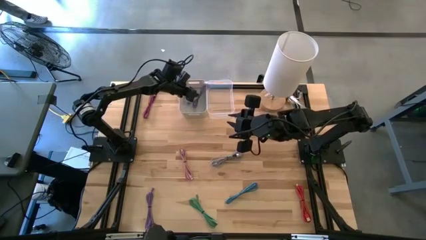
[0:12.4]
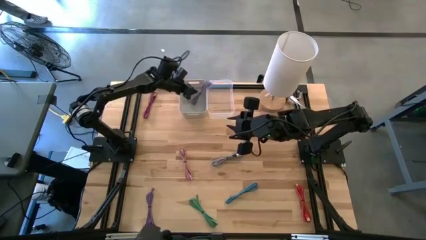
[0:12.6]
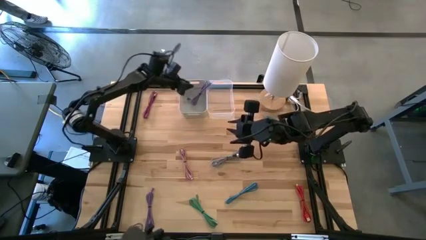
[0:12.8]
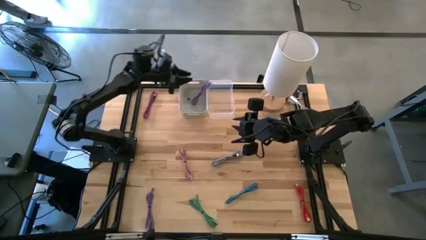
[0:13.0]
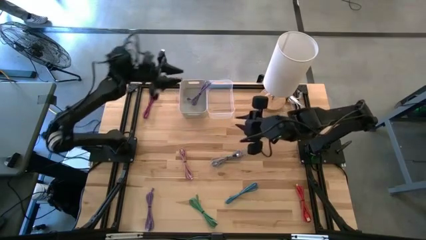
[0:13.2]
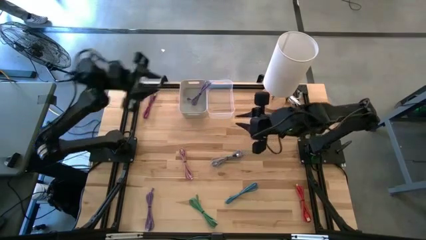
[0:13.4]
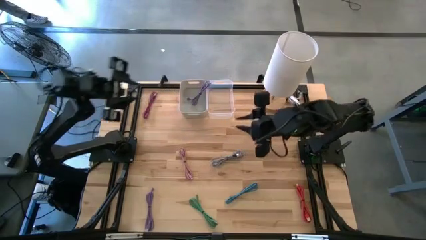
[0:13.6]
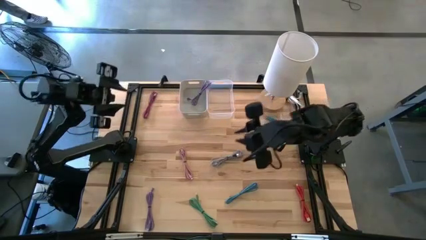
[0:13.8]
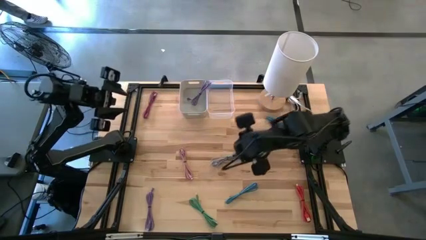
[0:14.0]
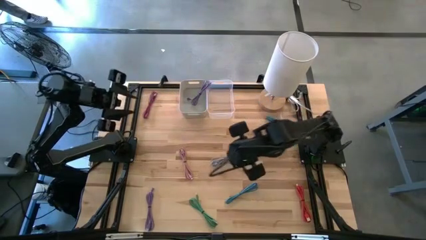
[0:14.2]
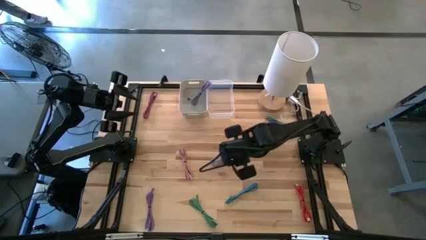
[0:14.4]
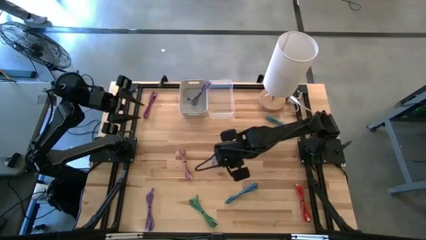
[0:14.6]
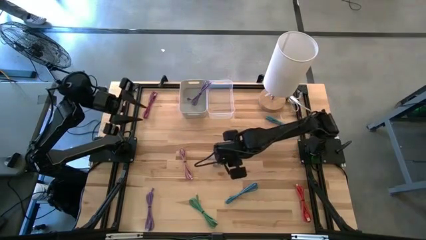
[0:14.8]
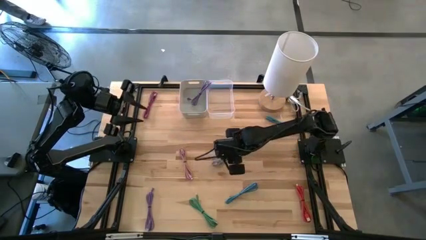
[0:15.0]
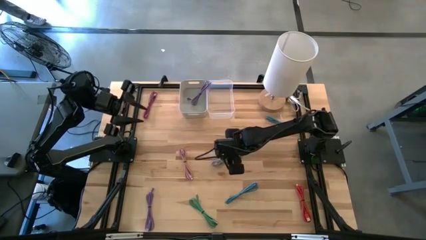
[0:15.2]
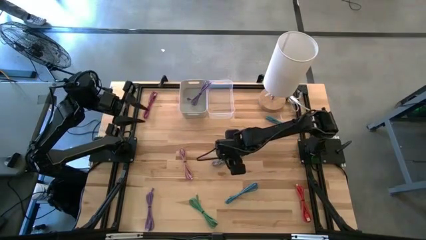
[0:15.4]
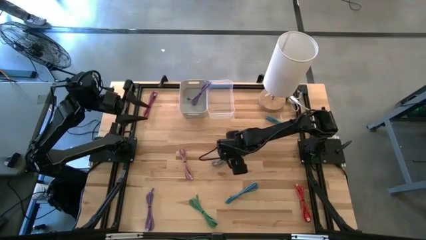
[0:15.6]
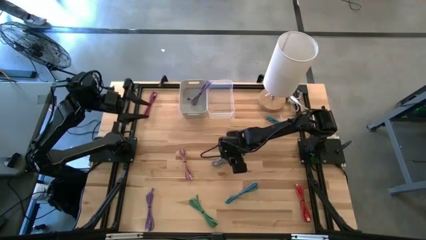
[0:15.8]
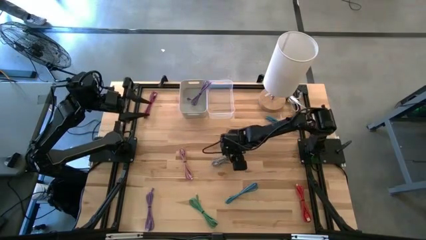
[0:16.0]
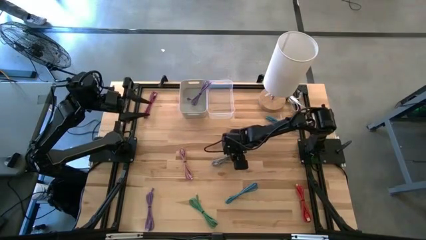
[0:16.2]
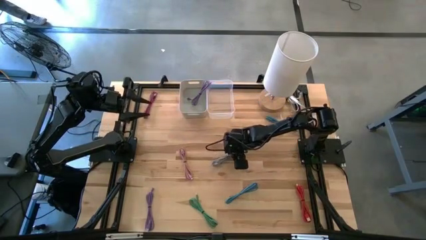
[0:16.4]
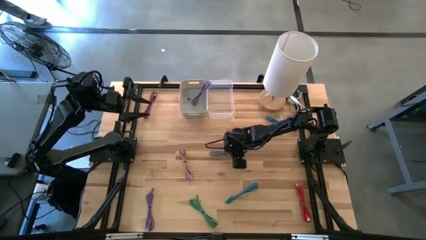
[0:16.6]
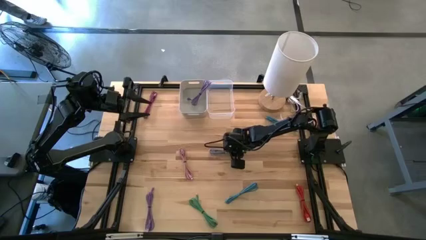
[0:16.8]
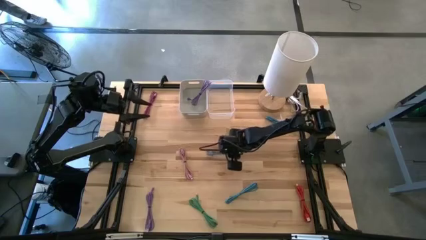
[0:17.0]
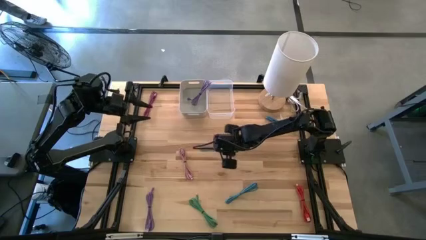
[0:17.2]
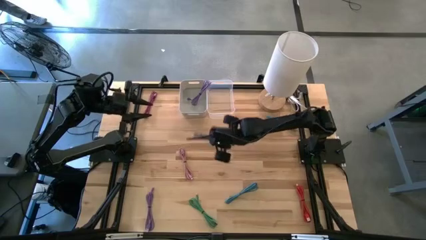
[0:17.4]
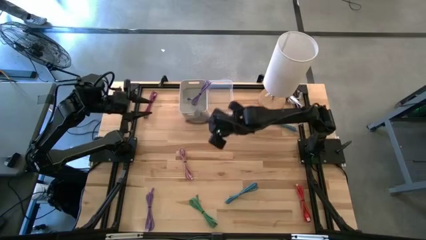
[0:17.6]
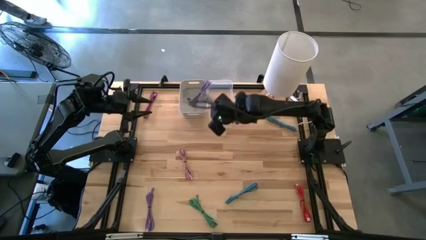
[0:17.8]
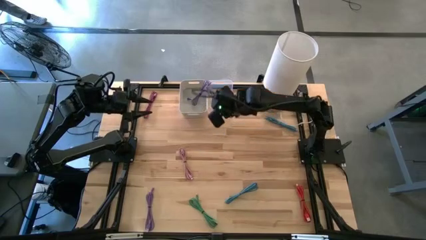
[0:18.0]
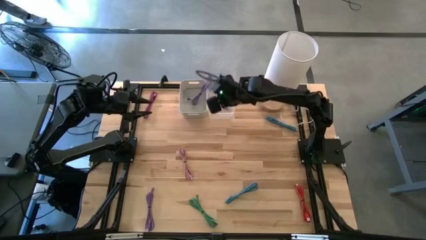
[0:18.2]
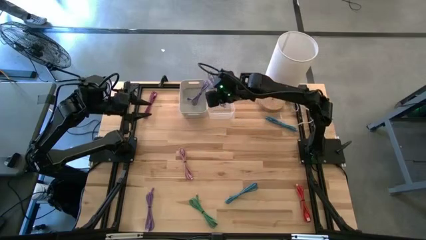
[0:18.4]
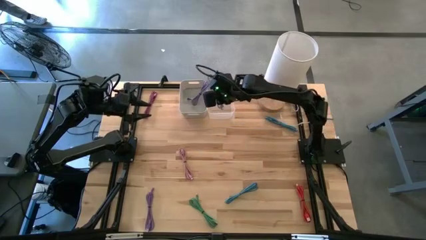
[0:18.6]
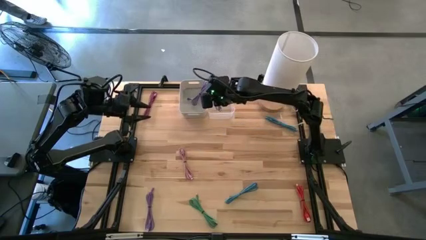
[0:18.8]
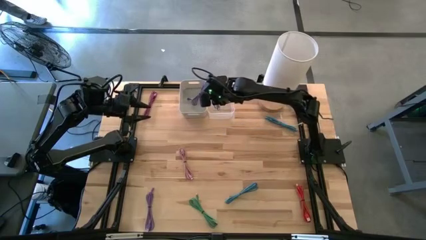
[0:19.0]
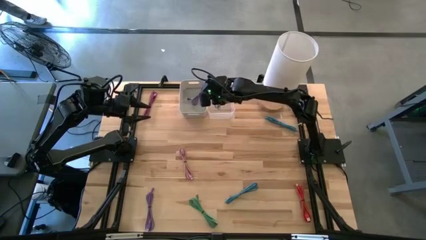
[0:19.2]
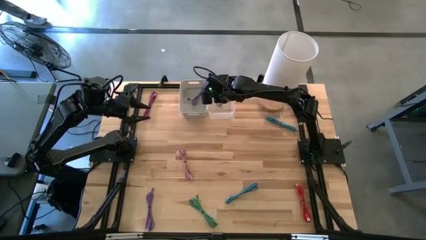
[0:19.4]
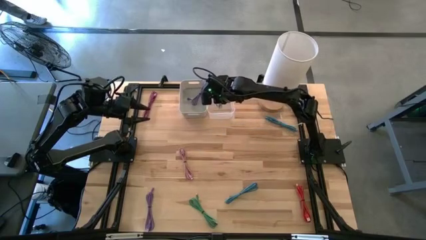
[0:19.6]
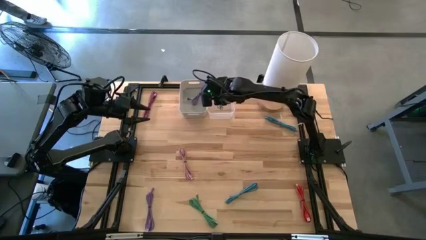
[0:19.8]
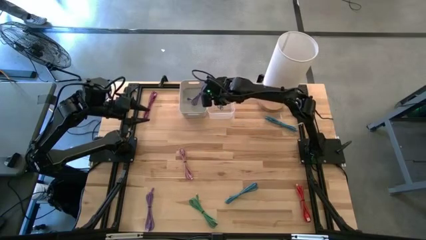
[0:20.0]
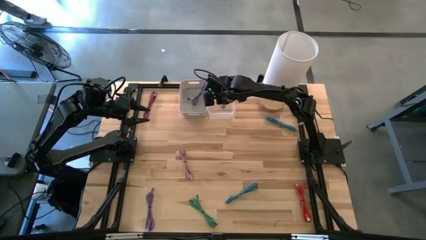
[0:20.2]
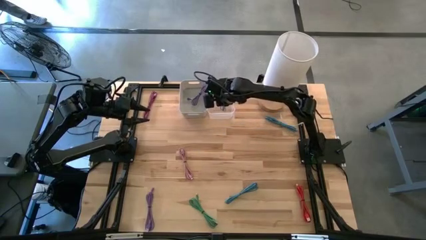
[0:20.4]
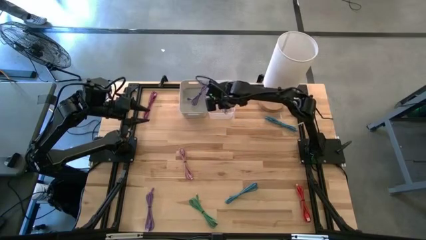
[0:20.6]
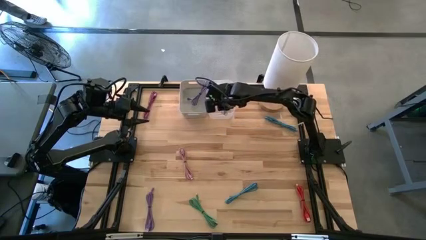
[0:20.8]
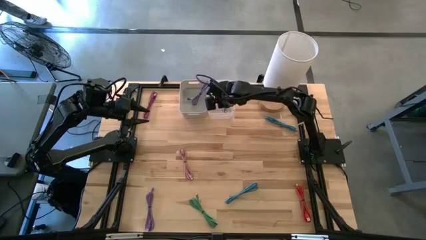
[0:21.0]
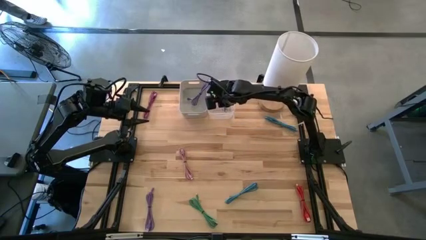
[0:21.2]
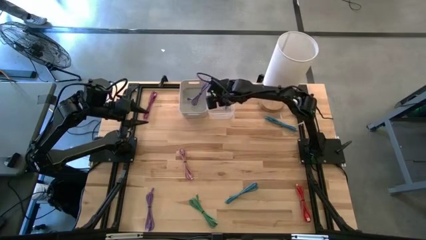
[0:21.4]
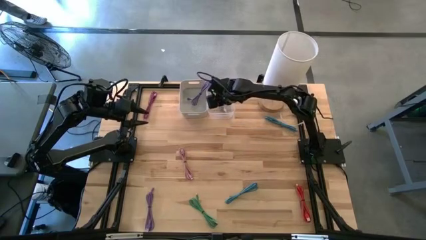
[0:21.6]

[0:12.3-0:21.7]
Task: Pick & Place USB Port
Put the black and white USB cable into the white transparent bin

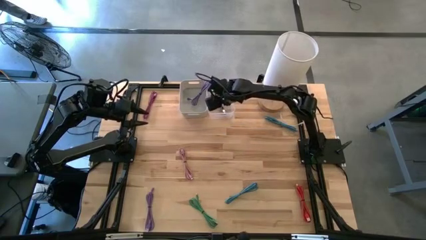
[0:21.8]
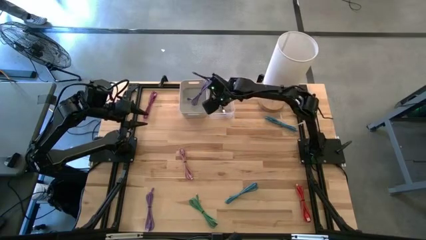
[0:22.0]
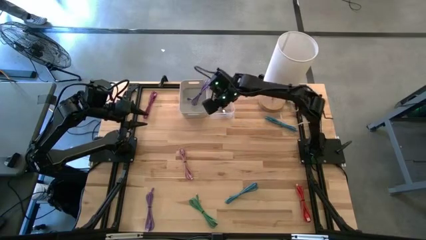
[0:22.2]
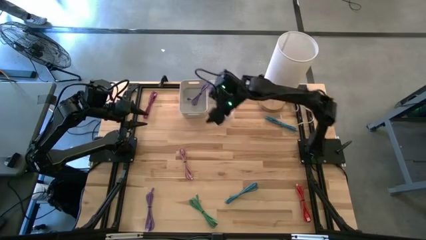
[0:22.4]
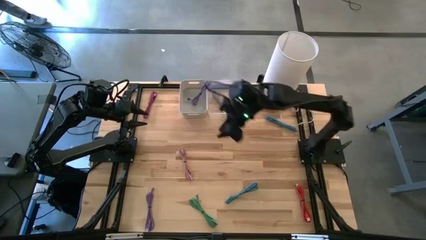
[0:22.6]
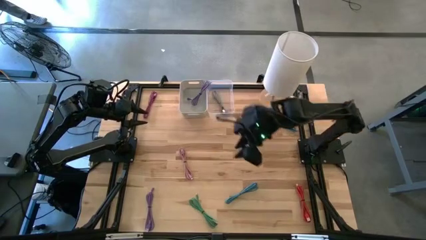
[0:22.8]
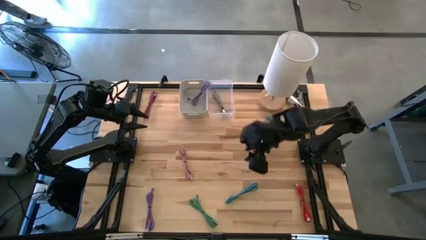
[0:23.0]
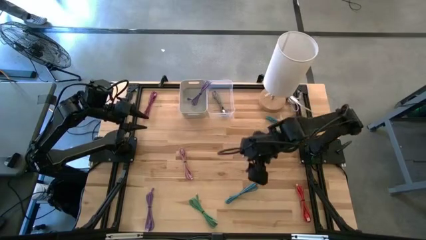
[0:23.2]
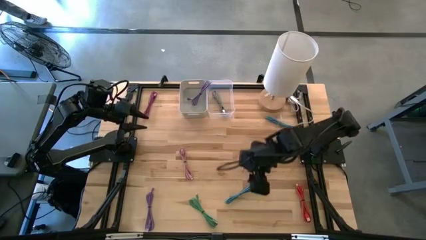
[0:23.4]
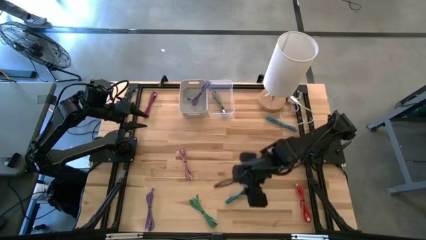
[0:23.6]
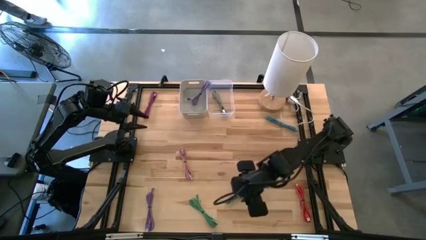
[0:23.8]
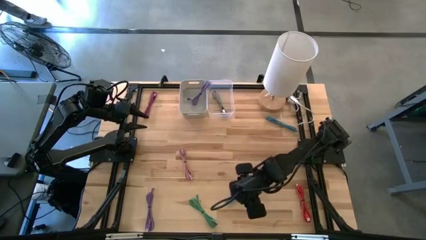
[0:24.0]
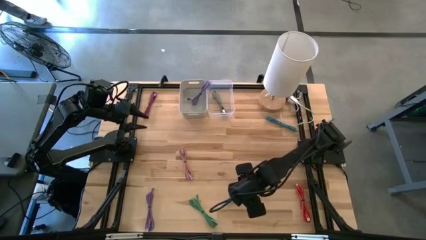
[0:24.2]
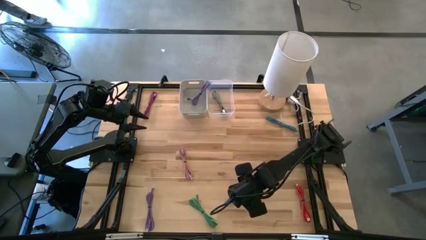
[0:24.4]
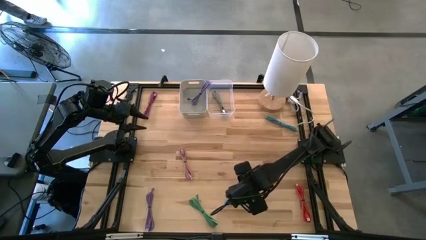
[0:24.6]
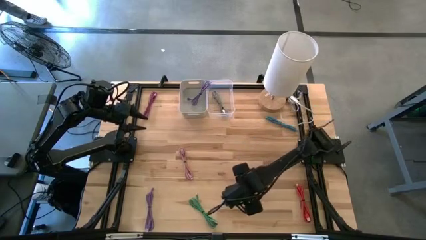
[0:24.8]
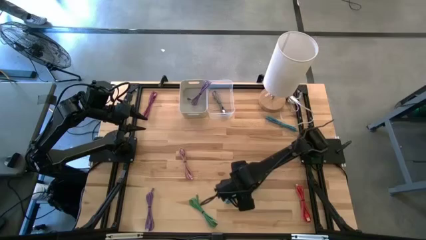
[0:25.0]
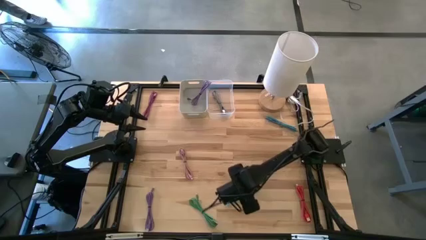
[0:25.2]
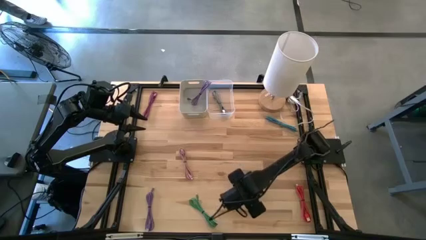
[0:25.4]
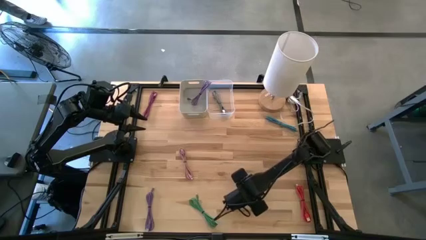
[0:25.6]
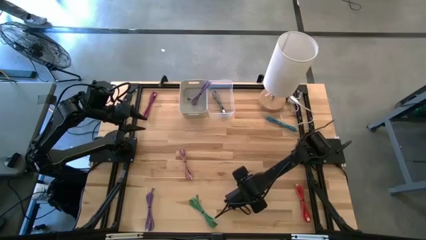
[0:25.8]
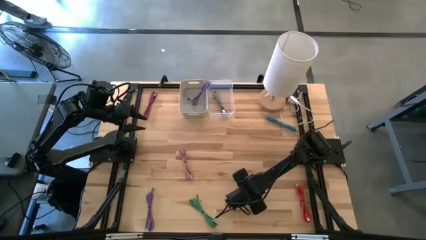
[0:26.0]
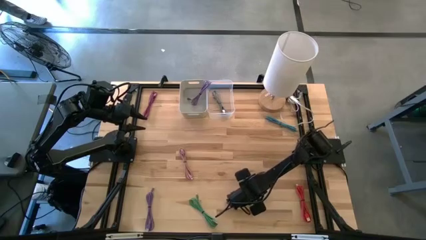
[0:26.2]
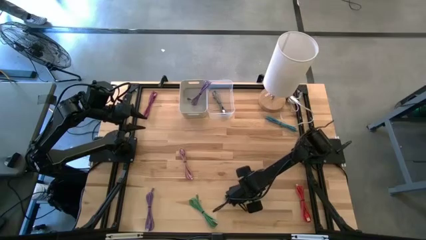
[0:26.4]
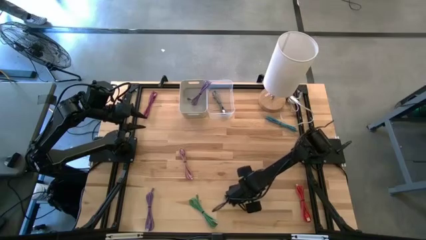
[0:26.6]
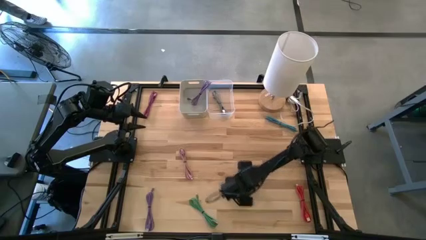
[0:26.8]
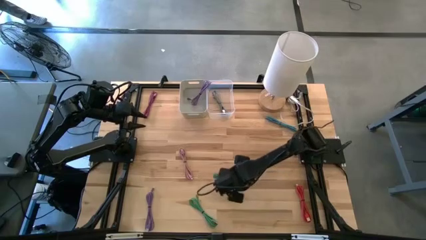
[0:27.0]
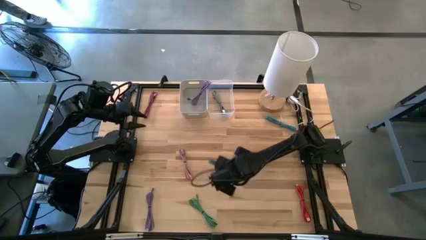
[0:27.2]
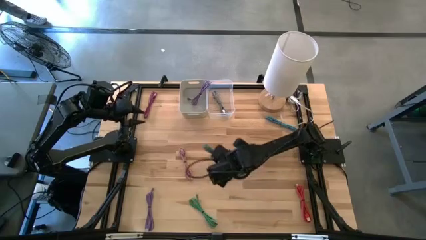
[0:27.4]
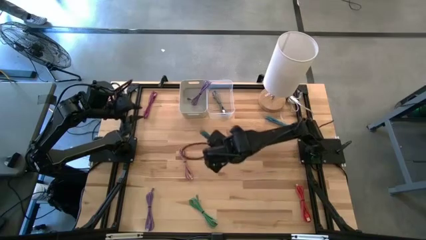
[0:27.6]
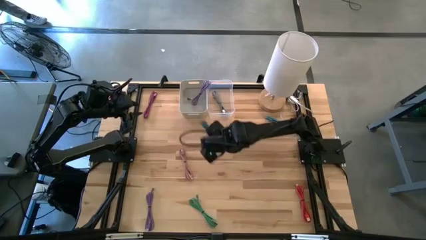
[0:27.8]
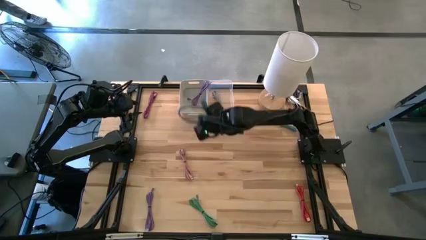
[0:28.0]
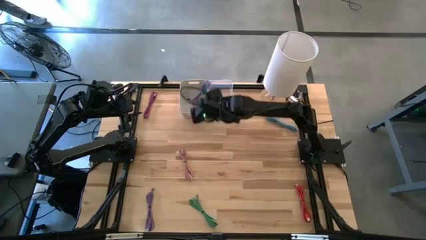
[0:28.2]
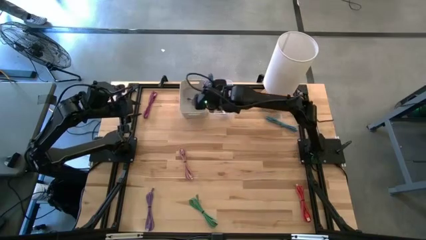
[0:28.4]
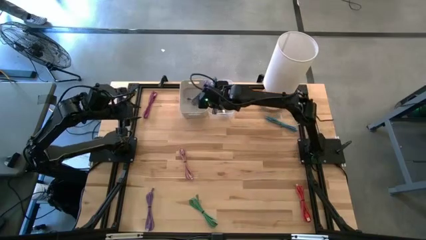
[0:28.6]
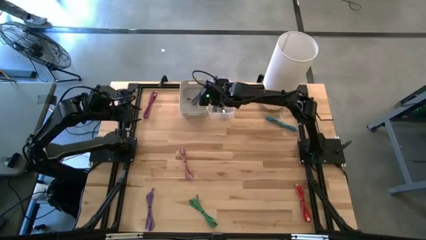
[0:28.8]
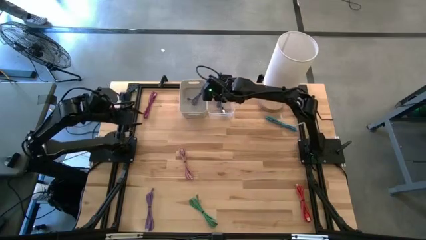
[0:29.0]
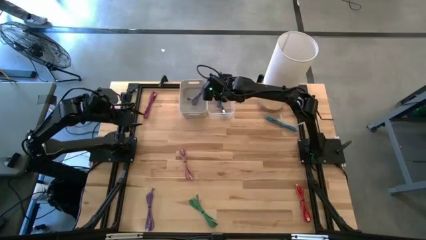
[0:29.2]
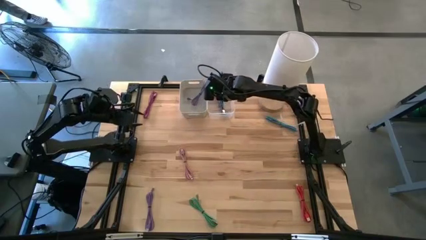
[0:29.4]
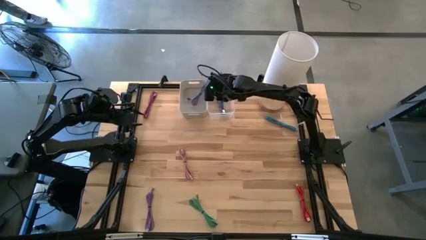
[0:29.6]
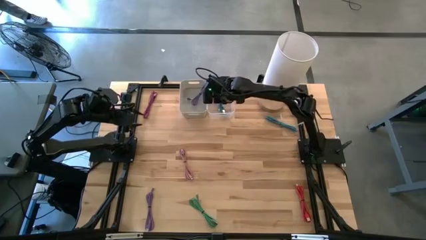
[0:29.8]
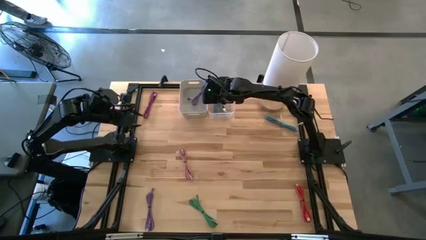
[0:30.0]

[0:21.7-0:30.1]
Put the bottom blue and white USB cable into the white transparent bin
